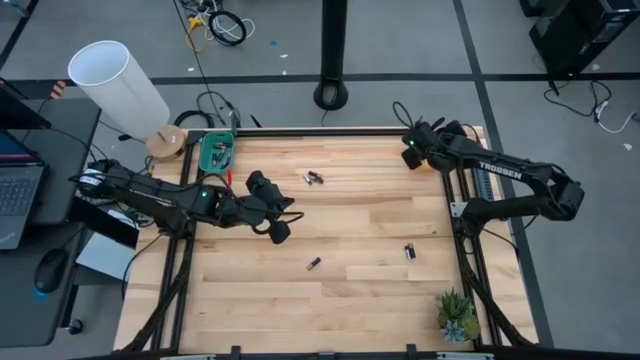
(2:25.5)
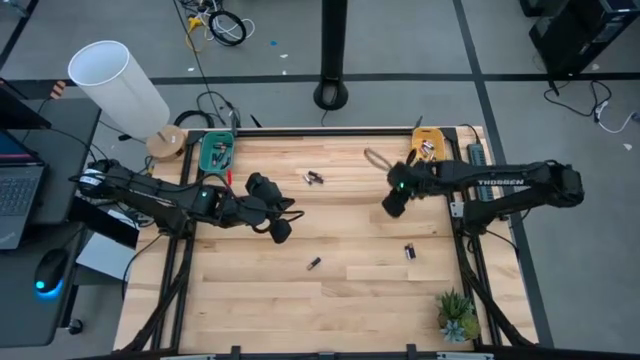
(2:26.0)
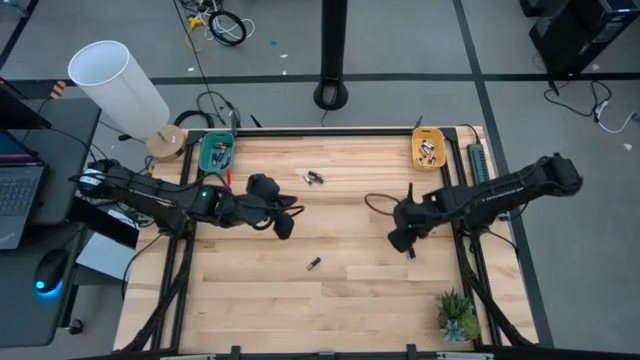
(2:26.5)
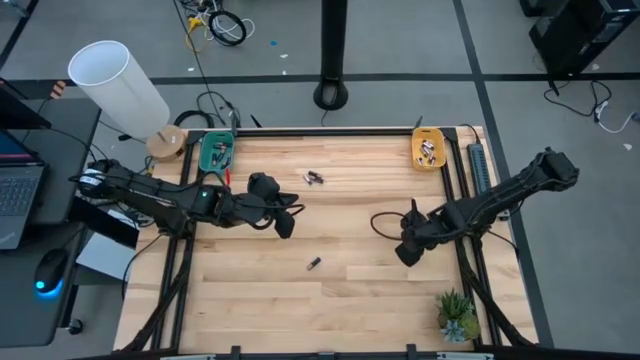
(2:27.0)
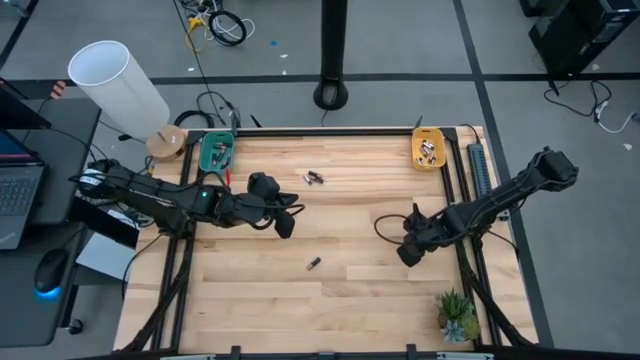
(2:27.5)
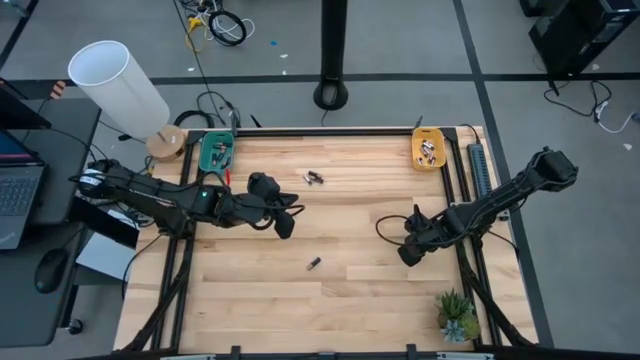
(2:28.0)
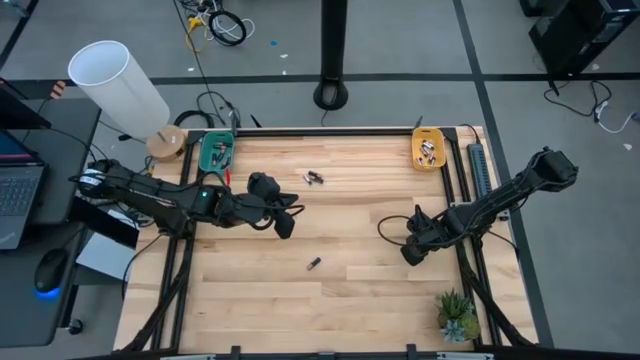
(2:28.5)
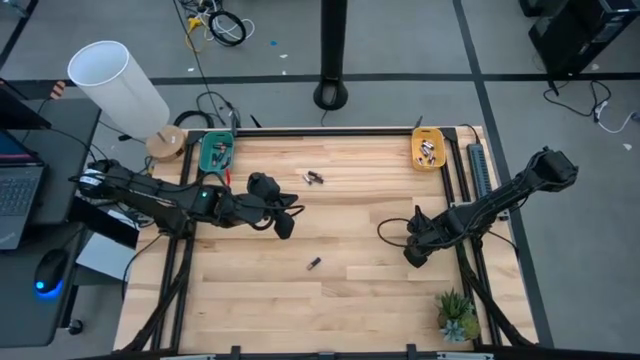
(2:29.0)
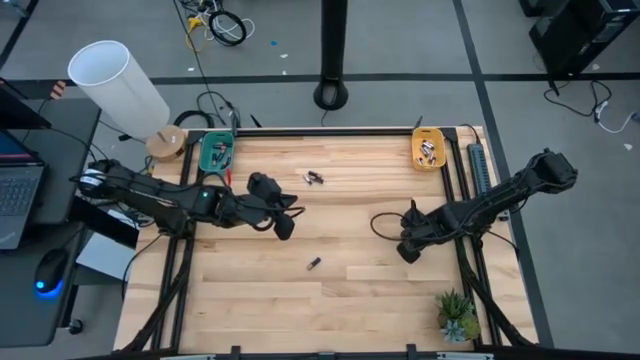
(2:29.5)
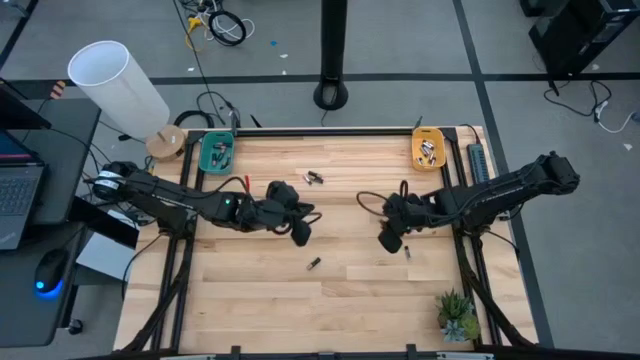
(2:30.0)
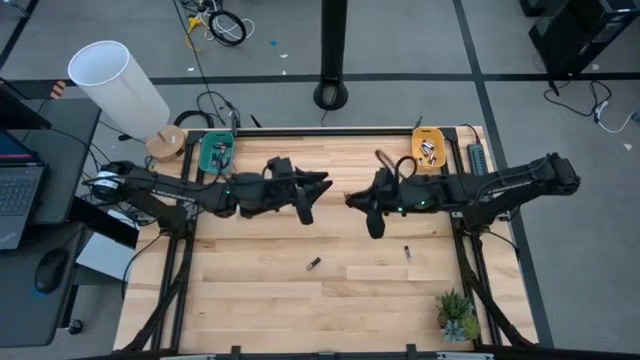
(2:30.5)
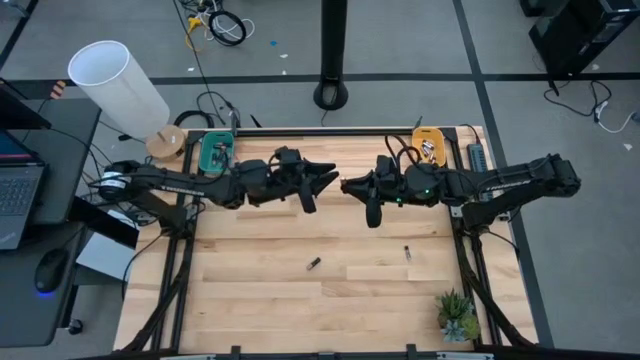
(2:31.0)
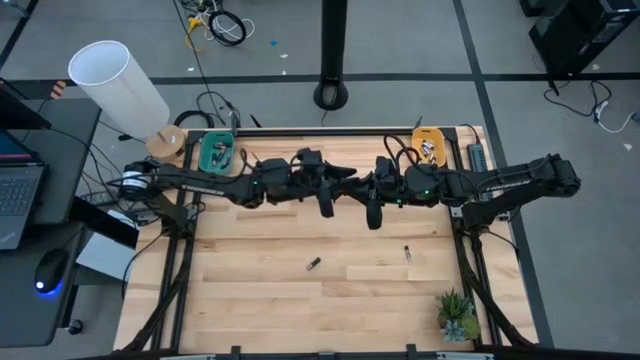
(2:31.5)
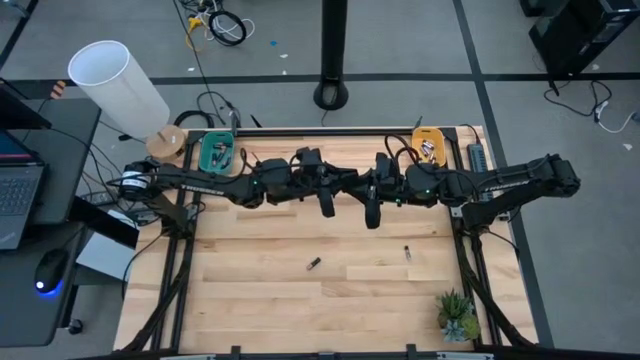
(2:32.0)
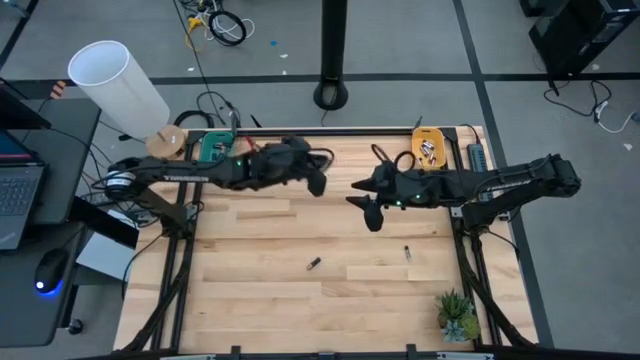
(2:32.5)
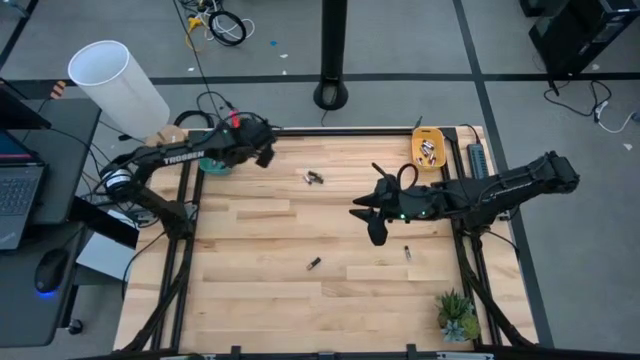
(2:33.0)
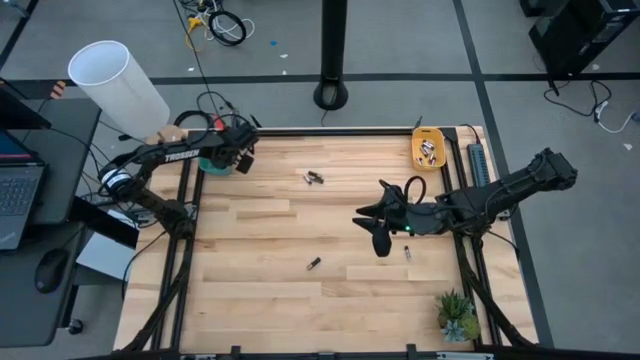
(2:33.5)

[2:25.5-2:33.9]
Task: Sort batteries
Put the black battery into the blue bin

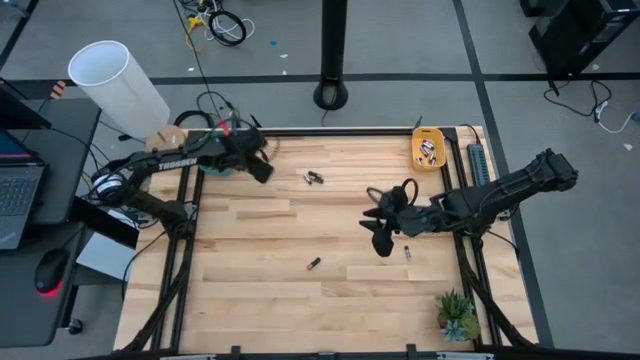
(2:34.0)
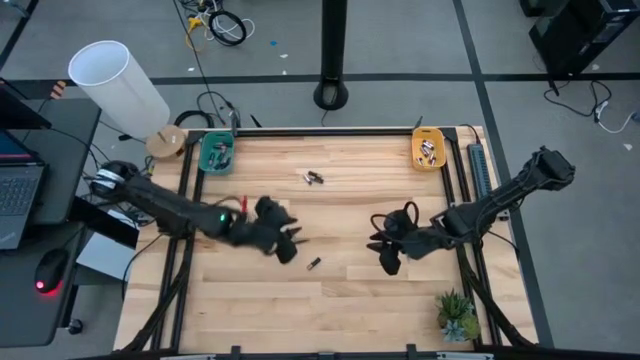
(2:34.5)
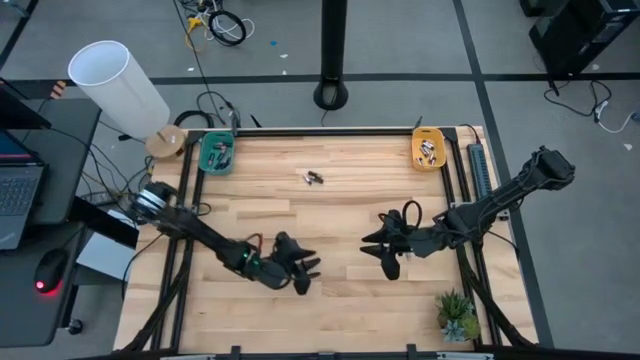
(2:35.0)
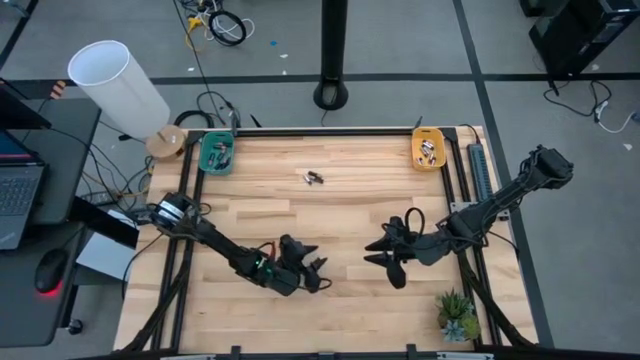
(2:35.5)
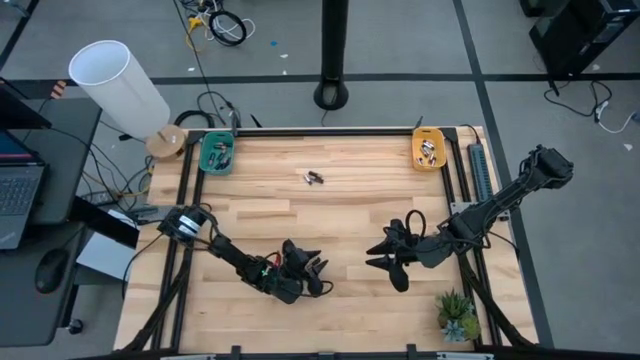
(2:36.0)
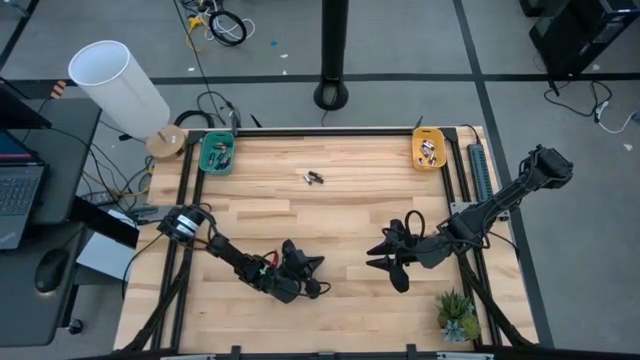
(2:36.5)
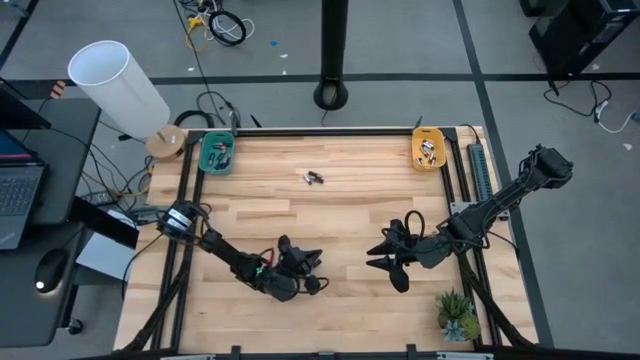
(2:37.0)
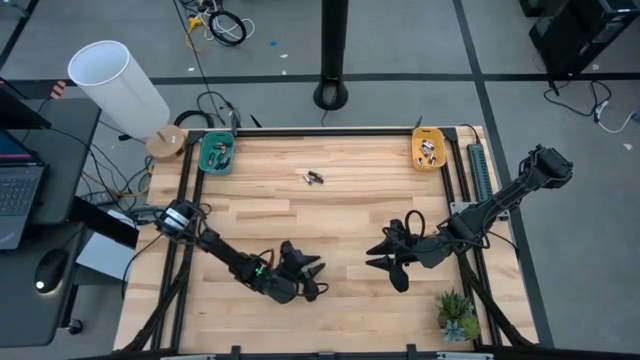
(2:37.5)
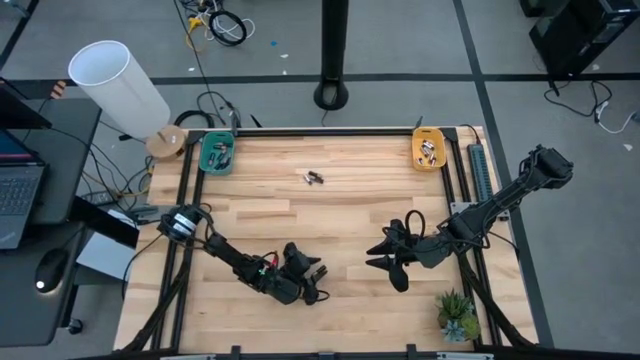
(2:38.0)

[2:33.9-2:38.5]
Put the black battery into the blue bin

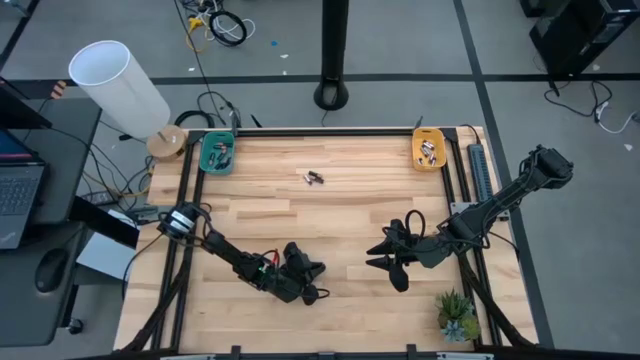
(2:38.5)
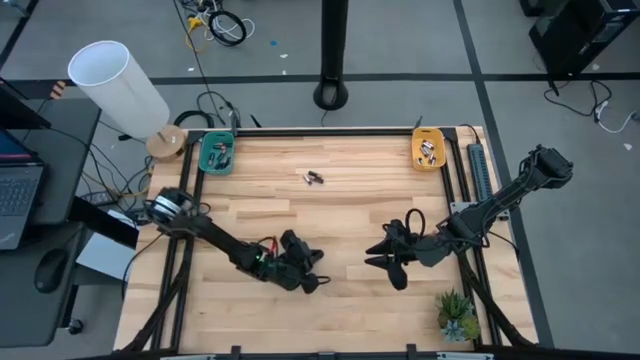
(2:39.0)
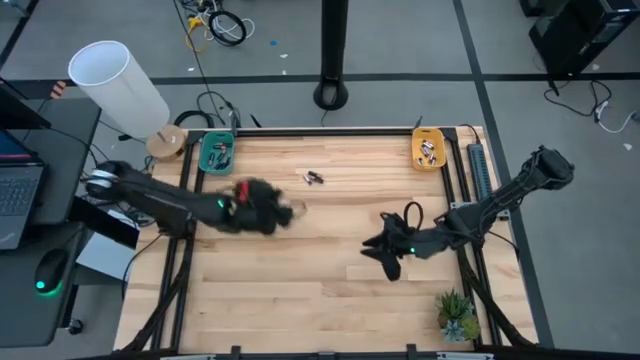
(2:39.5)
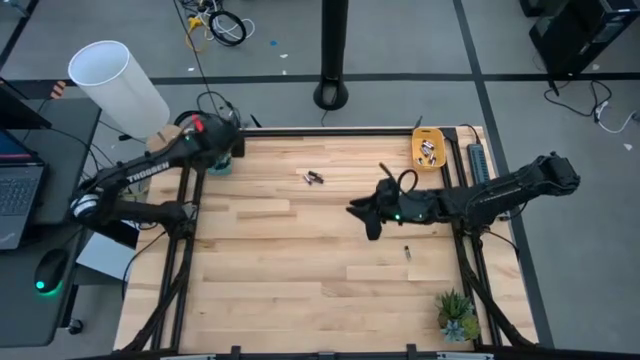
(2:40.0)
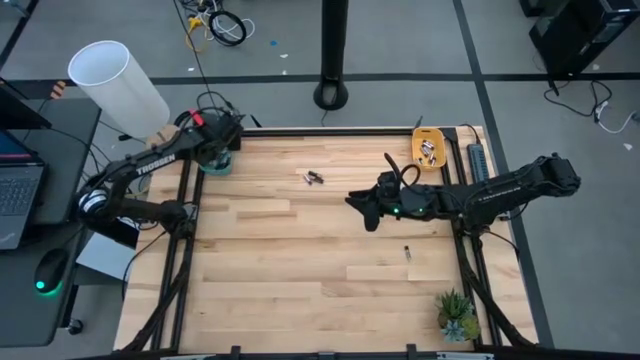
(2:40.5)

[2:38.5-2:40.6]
Put the black battery into the blue bin

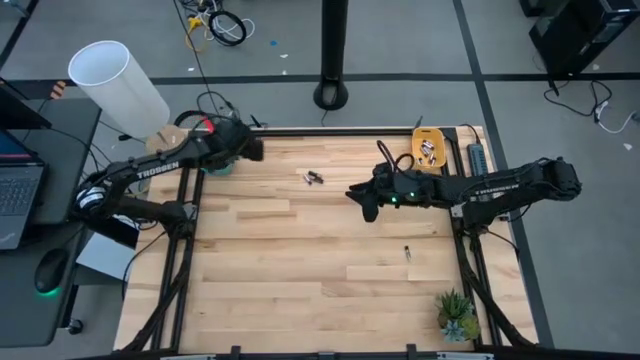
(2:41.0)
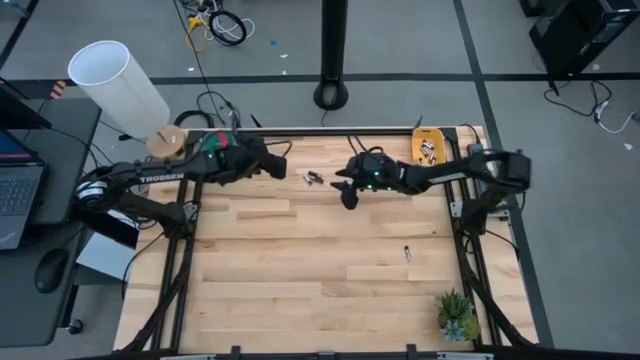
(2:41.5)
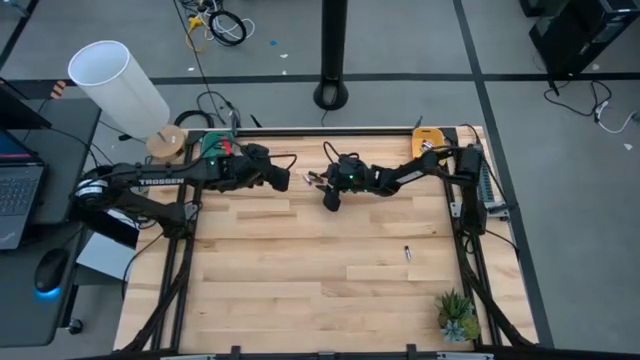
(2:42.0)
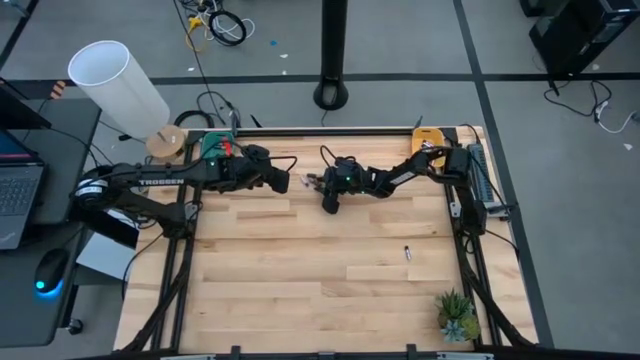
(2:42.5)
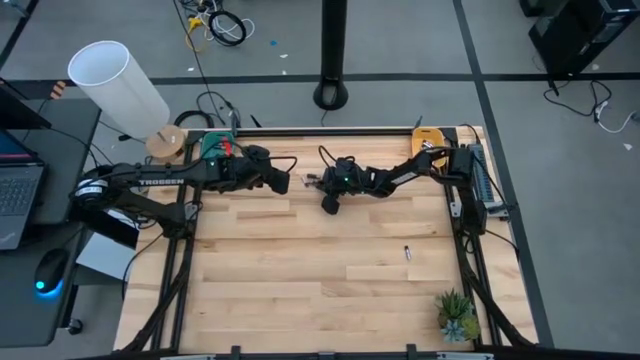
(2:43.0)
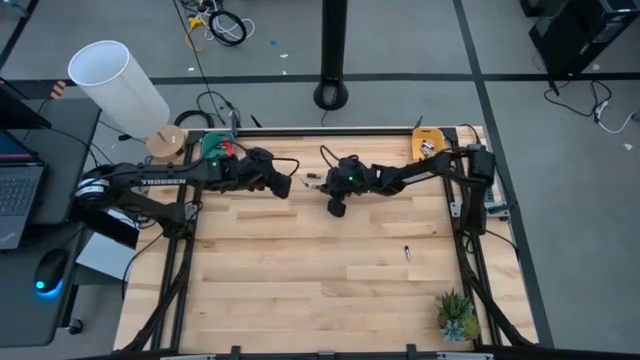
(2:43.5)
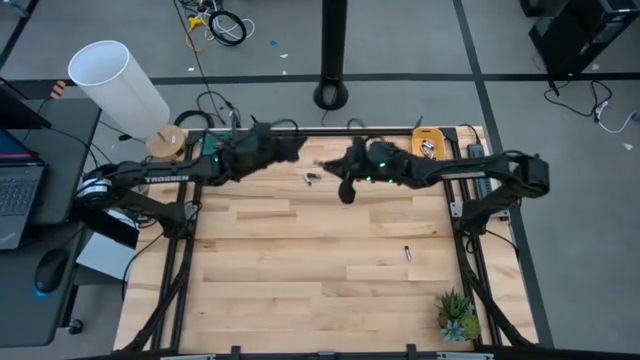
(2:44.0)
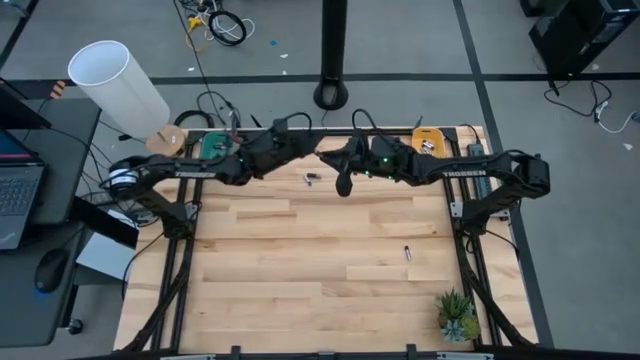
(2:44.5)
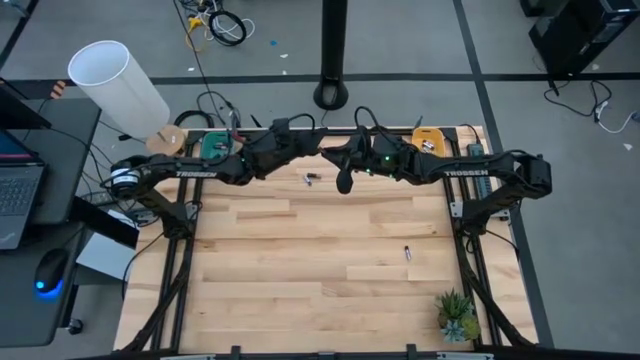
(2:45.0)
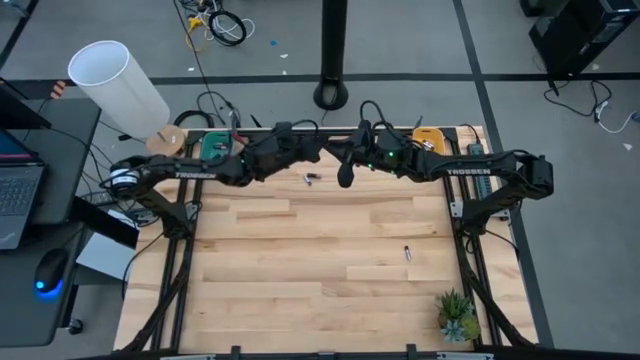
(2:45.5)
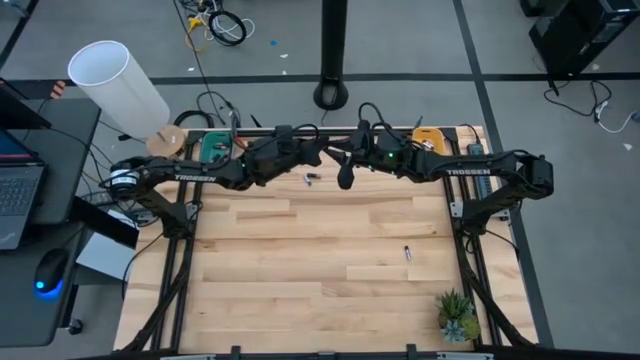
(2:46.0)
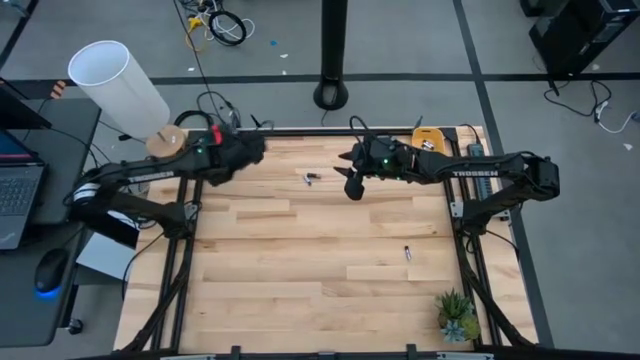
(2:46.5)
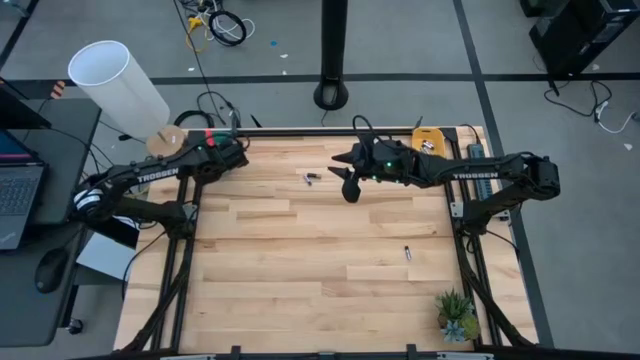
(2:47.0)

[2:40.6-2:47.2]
Put the black battery into the blue bin

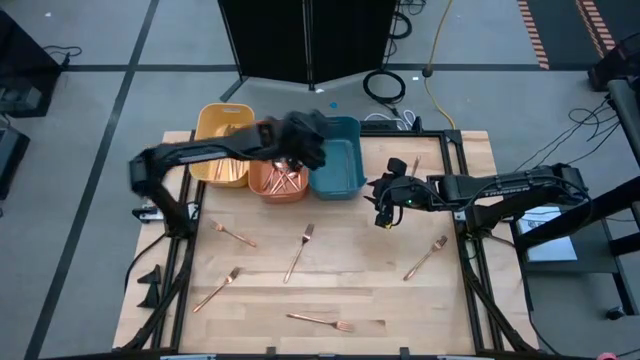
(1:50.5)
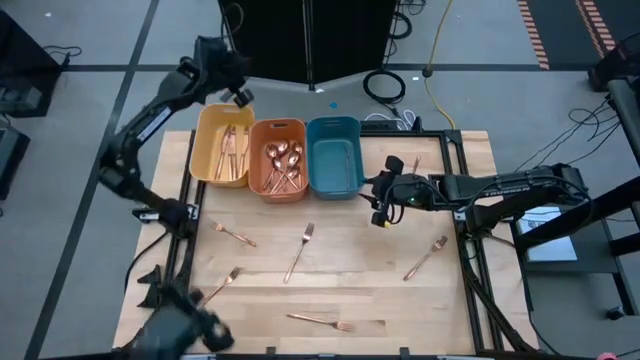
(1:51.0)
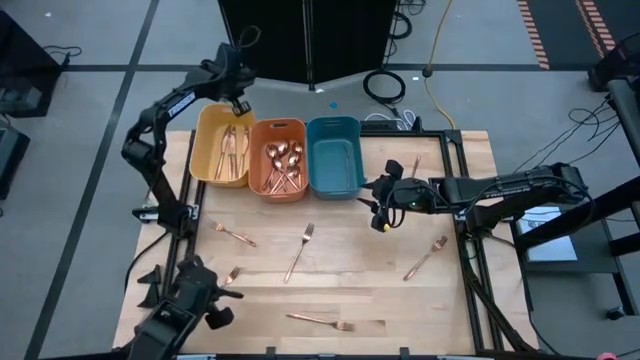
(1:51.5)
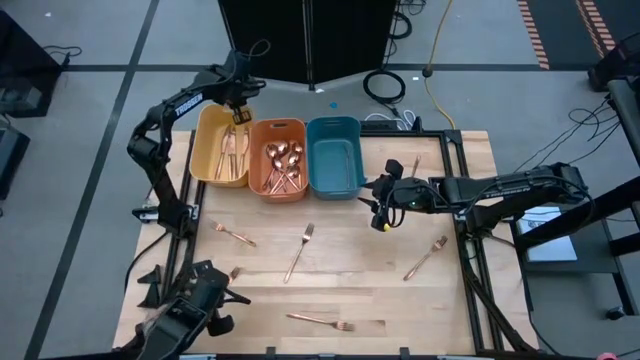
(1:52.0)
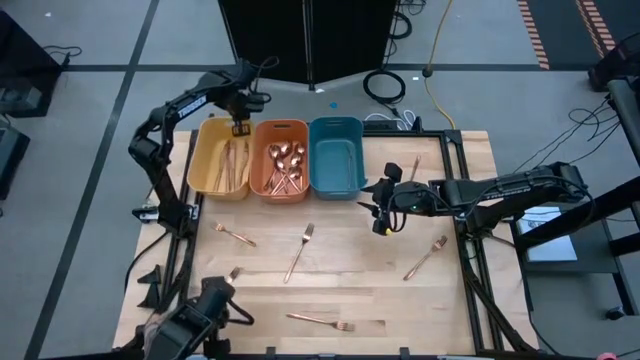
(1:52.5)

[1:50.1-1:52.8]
Task: Sort silverware
Adjust the yellow bin
